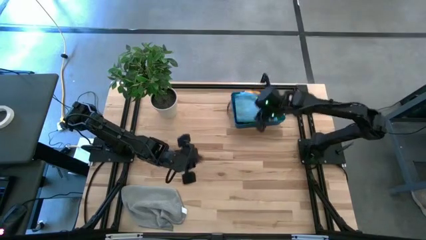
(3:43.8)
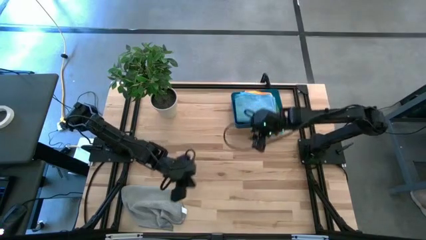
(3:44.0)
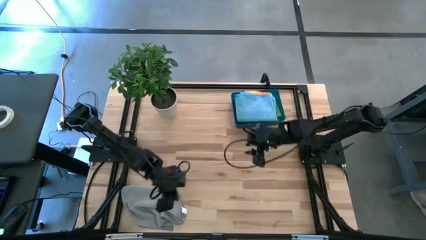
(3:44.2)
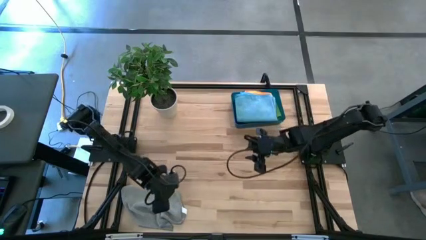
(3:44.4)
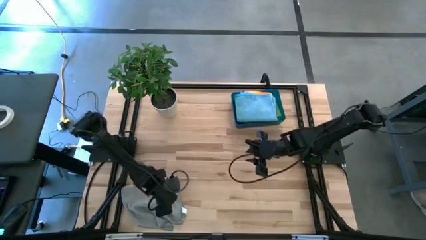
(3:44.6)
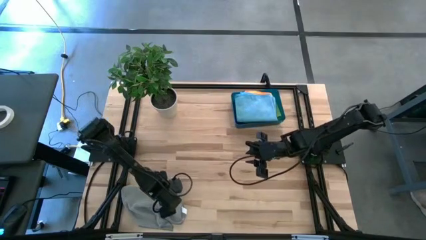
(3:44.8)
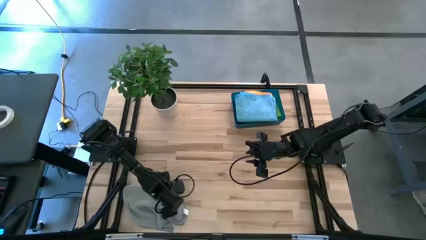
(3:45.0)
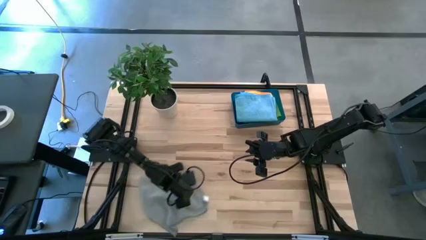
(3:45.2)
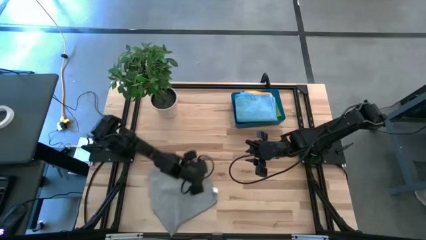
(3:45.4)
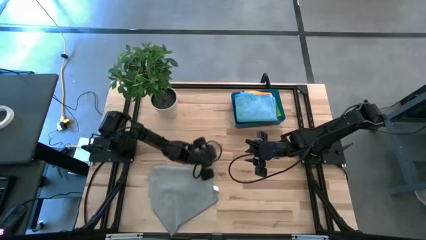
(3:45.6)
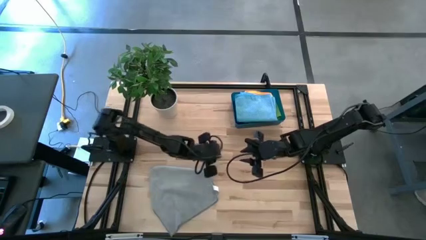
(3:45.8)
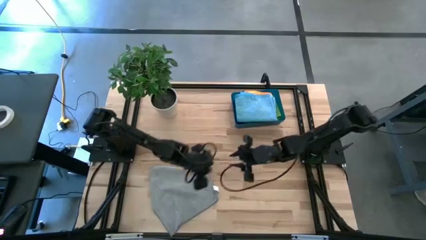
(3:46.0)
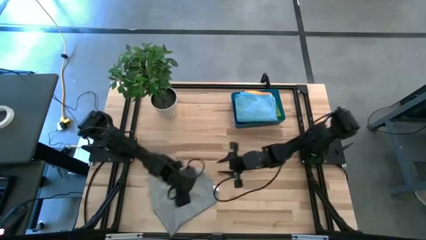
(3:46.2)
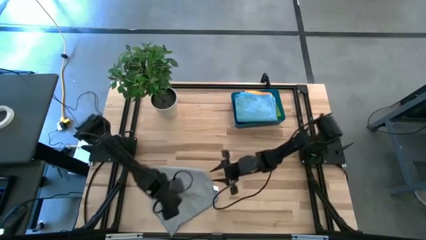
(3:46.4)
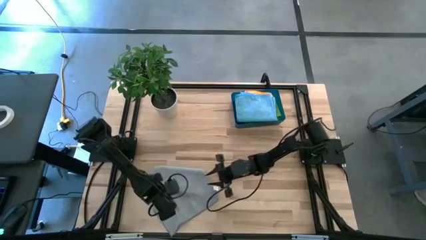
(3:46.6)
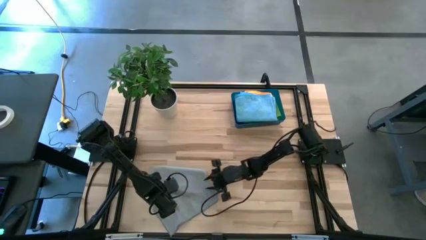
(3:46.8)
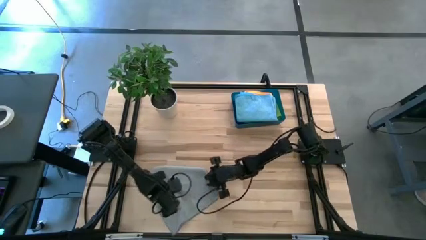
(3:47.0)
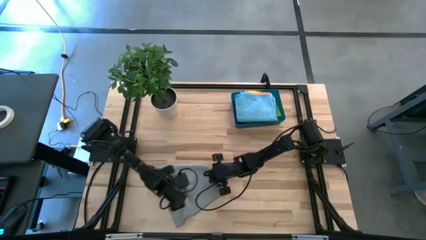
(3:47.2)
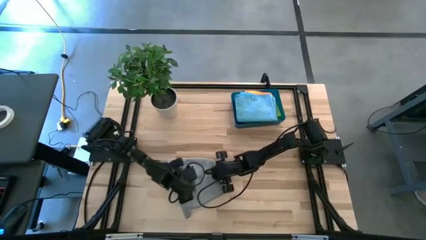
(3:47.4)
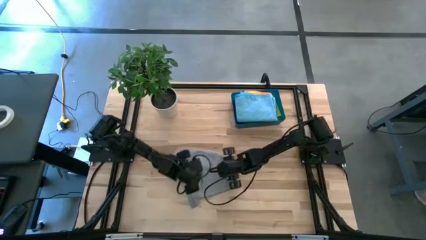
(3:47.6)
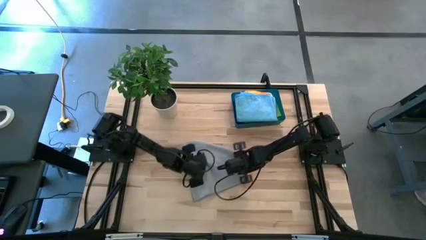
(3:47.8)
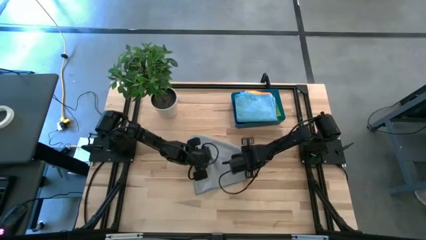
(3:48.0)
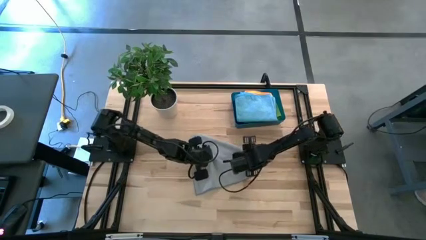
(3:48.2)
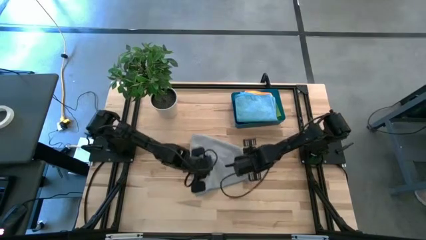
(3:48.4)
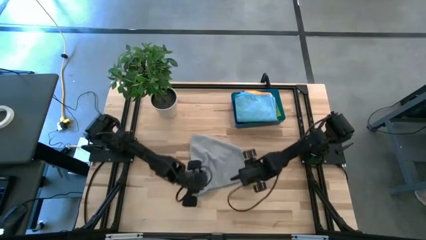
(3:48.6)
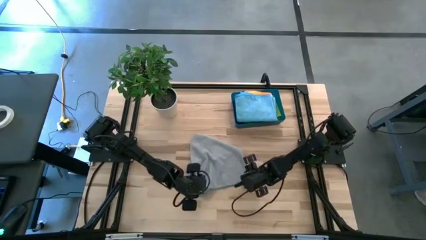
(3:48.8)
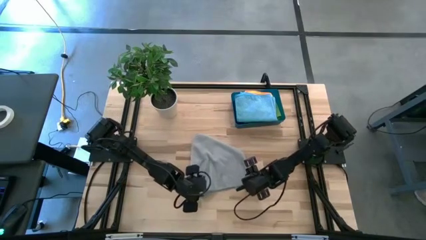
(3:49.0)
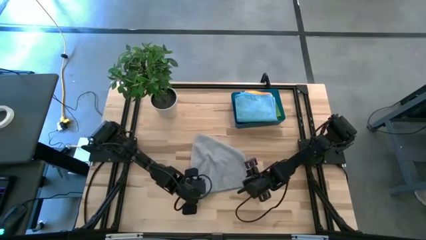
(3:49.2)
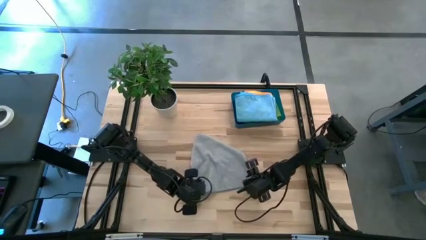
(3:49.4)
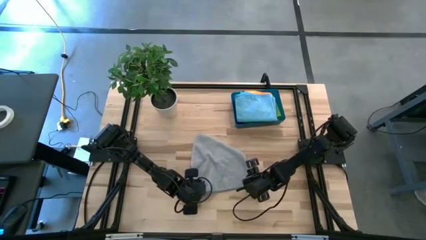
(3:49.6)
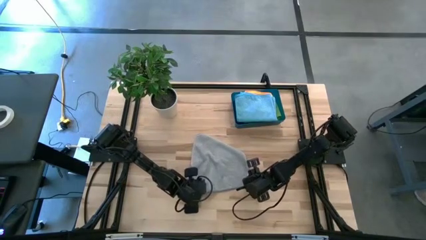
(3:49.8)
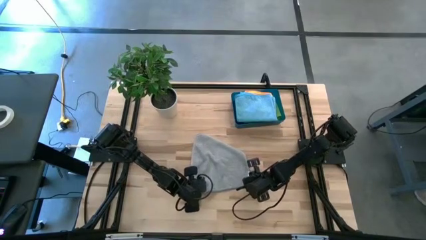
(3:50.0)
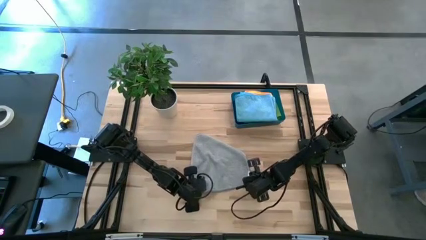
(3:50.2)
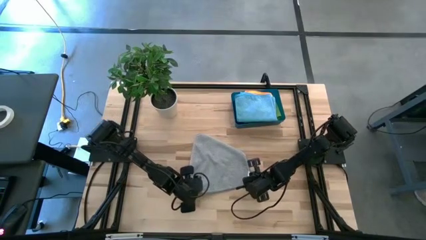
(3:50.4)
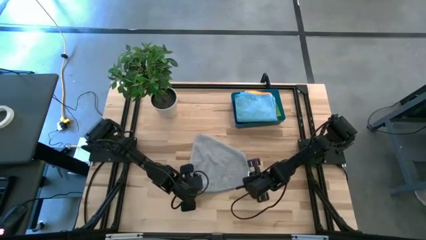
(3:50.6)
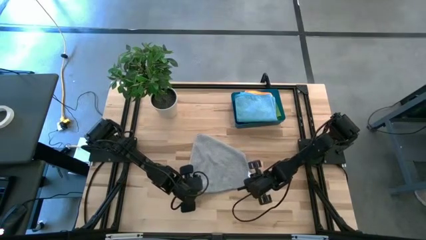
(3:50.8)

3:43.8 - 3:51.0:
Task: Fold microfiber towels
Fold the gray microfiber cloth

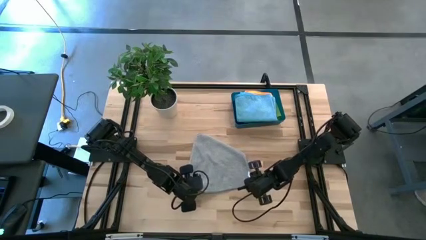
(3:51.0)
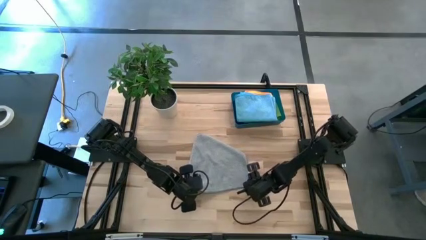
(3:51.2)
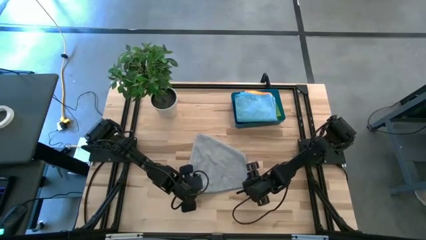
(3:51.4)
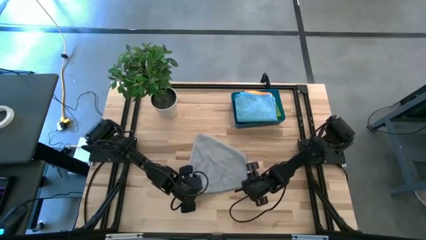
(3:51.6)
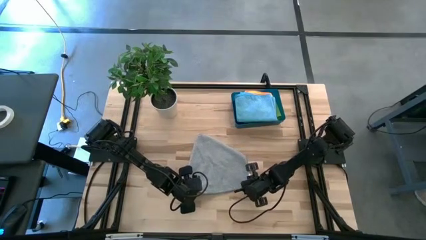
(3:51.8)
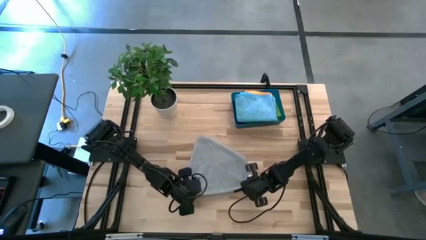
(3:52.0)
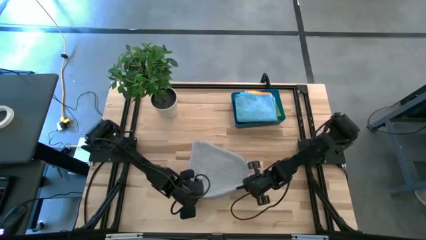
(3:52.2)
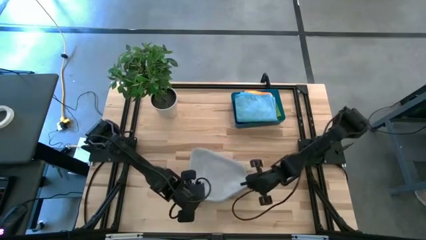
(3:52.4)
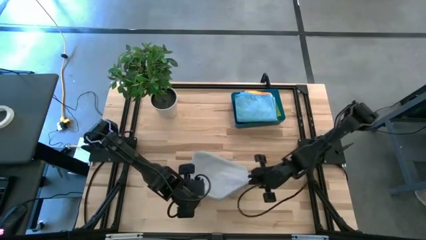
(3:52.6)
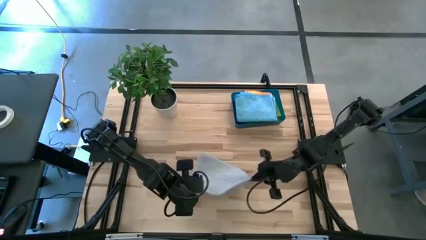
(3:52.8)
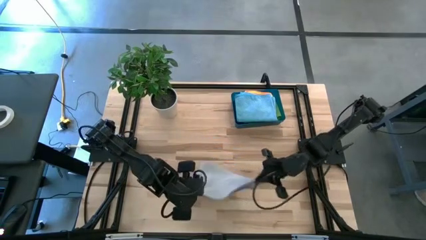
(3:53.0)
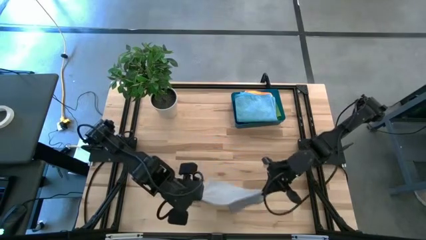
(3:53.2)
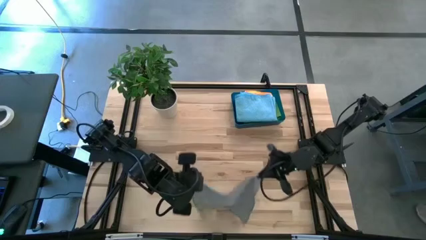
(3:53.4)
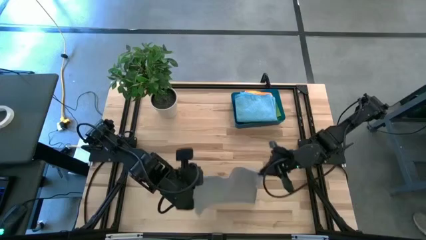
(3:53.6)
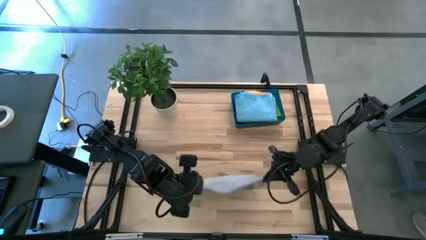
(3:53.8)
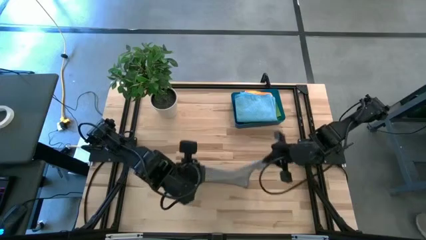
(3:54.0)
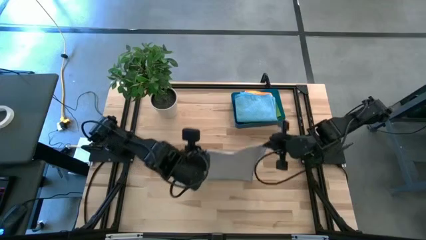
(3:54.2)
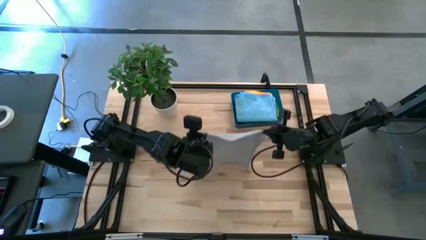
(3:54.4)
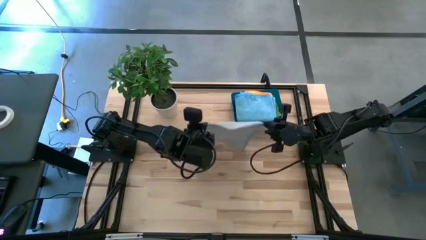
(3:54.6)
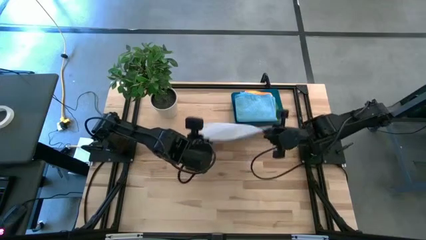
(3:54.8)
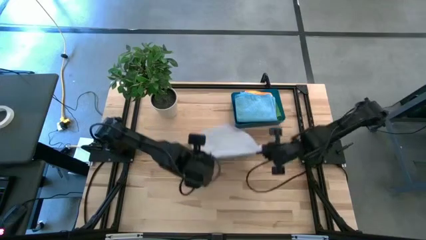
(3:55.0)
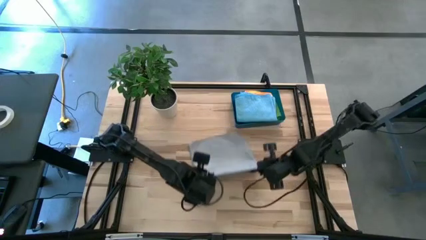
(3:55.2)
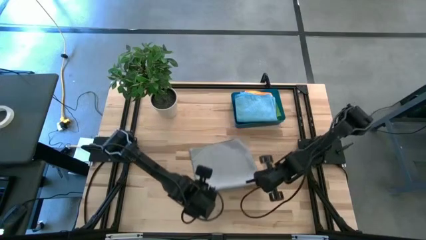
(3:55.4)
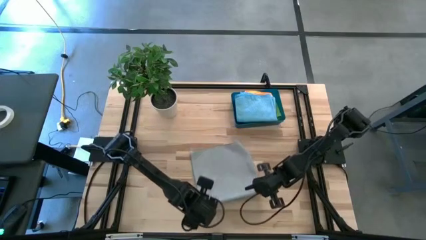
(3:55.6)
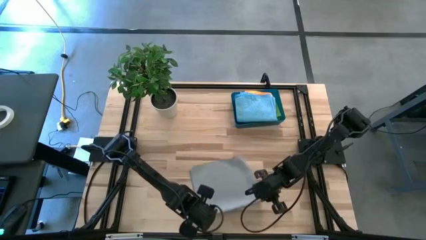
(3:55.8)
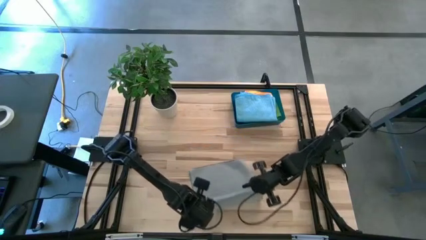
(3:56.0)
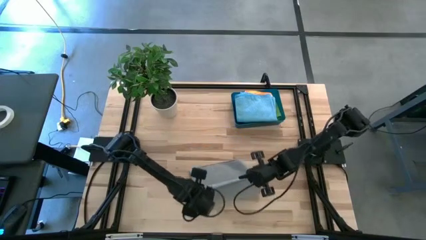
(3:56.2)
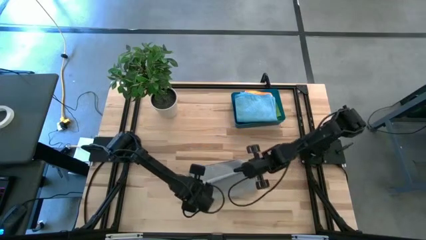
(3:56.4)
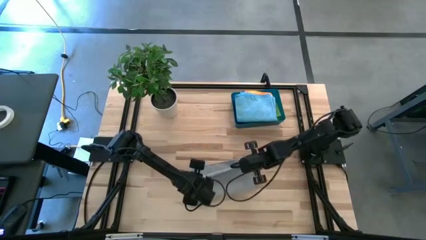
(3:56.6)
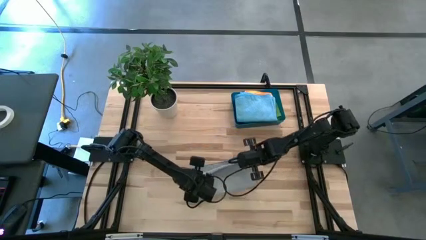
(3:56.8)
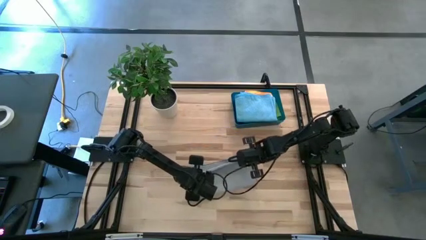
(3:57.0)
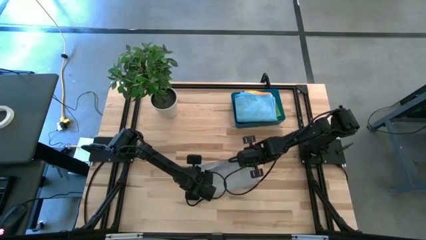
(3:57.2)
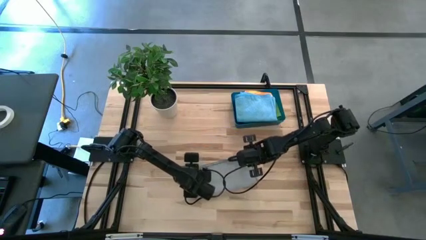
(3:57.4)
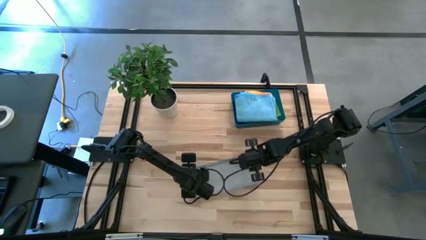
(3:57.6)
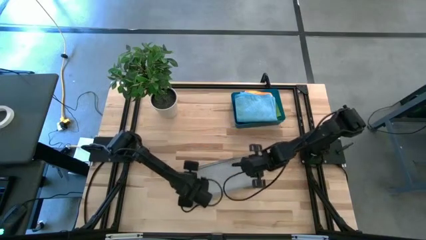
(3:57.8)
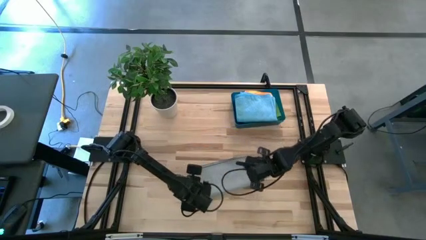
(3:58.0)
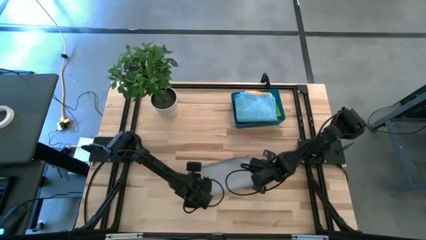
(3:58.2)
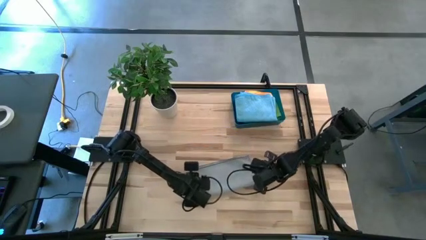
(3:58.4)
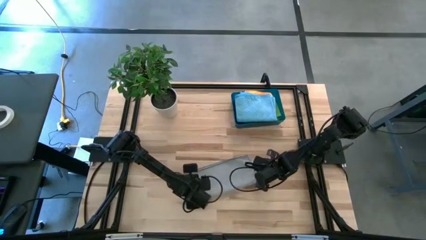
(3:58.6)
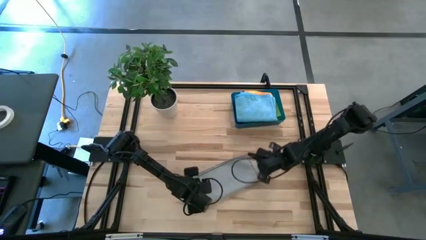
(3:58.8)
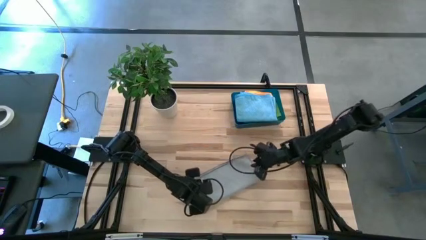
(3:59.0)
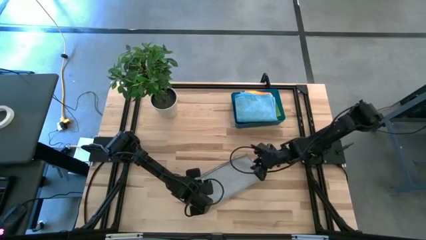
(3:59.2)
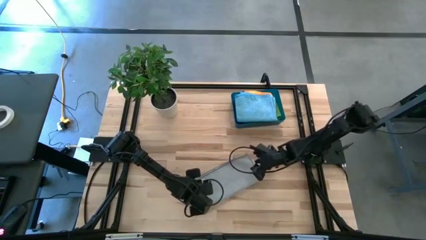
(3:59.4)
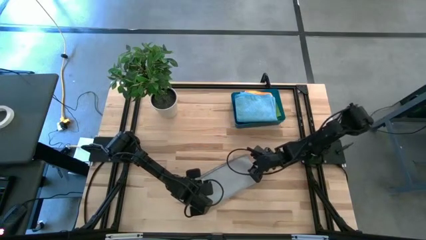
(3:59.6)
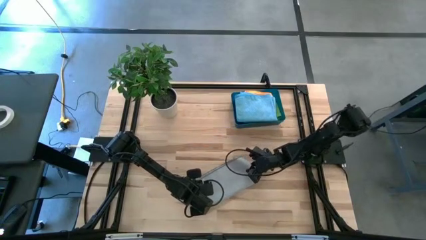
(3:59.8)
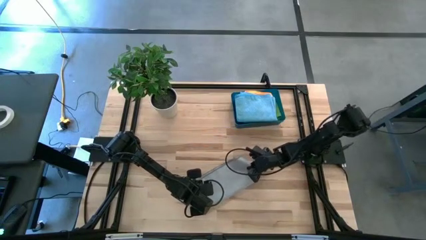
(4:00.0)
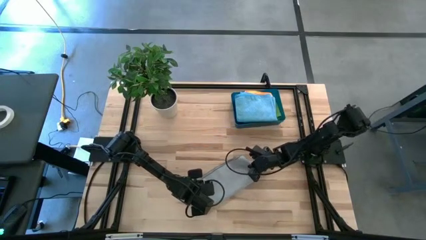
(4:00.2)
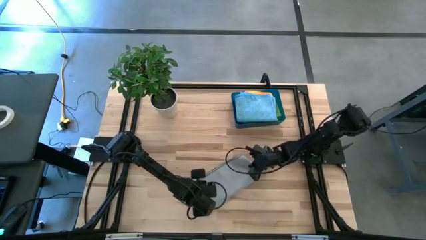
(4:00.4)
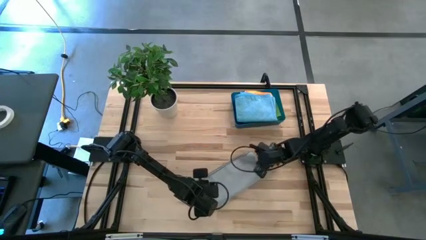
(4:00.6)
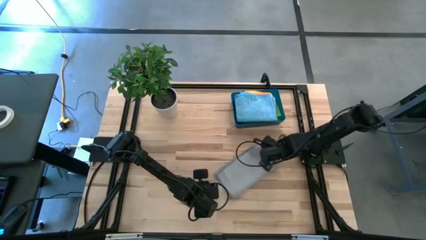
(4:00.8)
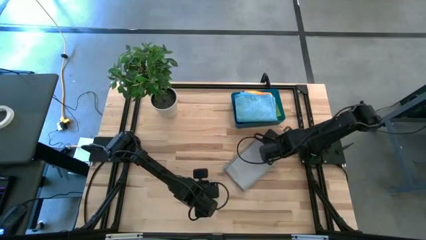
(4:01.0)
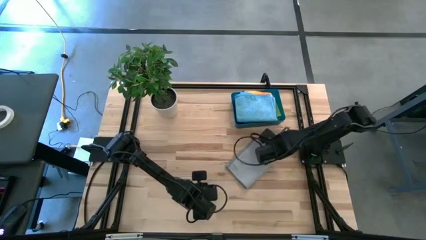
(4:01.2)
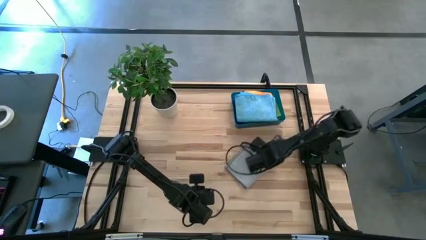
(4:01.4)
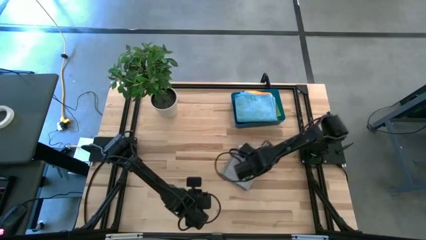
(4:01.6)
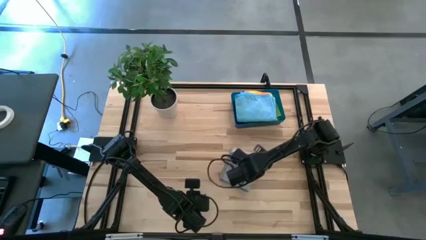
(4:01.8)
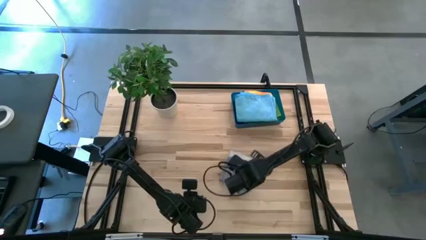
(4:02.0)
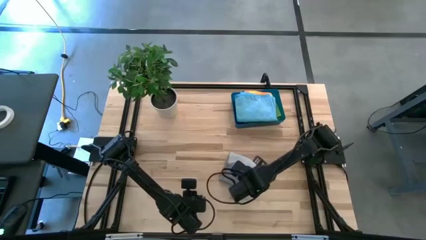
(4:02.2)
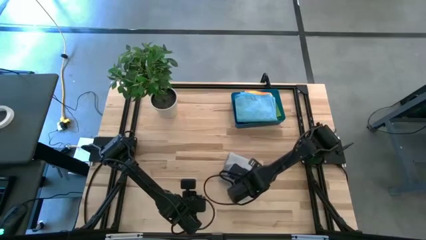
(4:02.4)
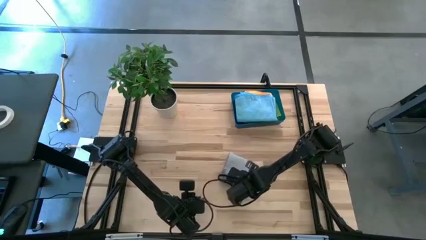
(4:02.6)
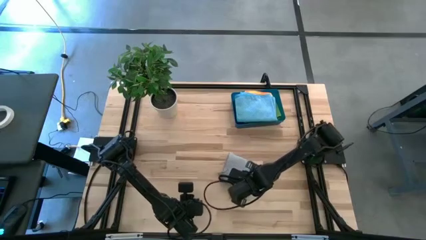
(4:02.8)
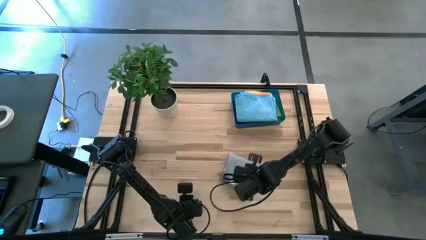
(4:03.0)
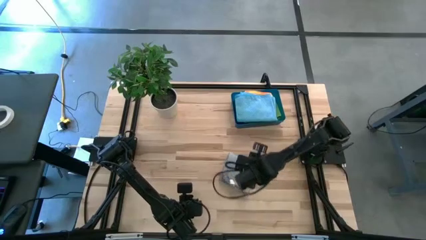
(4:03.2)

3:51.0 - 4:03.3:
Fold the gray microfiber cloth
